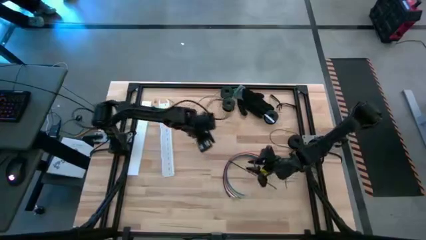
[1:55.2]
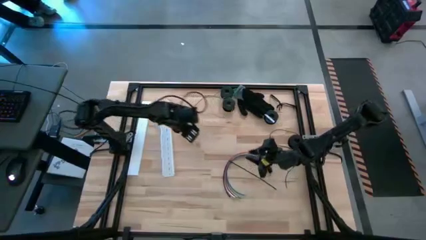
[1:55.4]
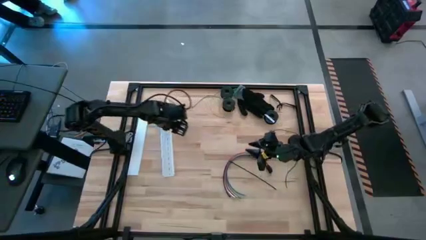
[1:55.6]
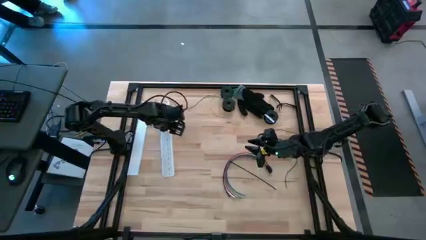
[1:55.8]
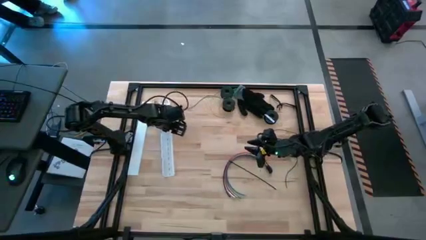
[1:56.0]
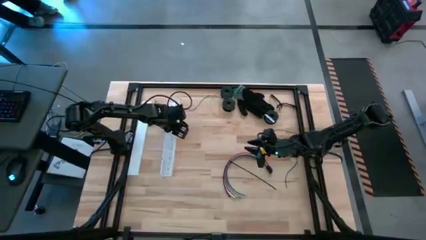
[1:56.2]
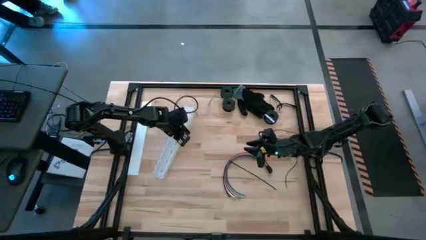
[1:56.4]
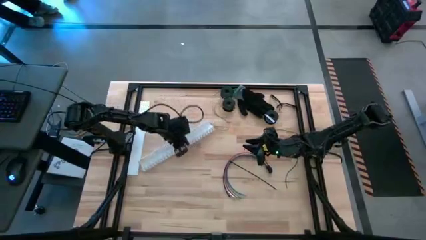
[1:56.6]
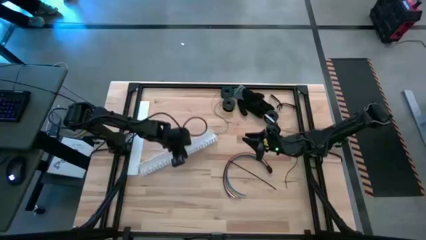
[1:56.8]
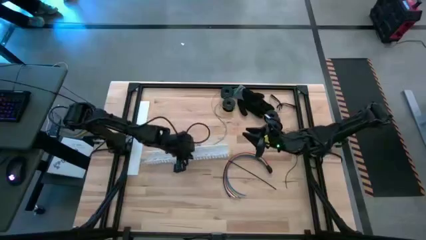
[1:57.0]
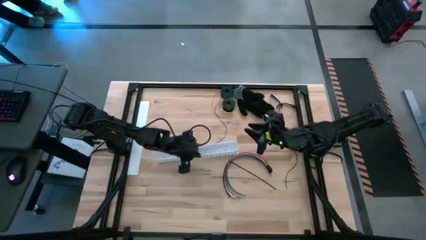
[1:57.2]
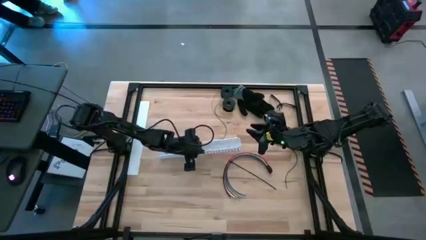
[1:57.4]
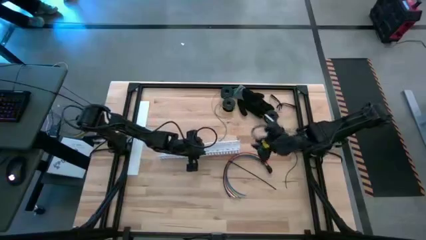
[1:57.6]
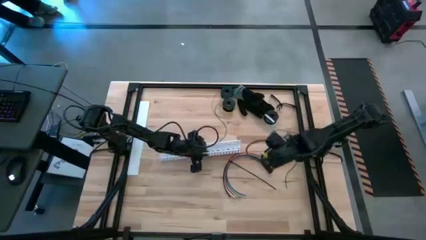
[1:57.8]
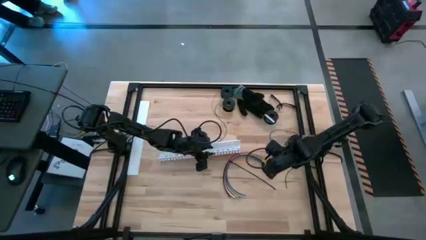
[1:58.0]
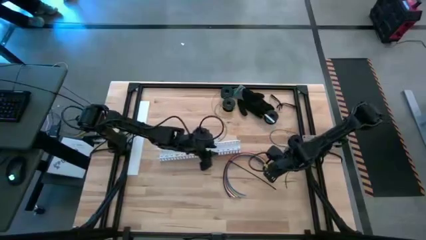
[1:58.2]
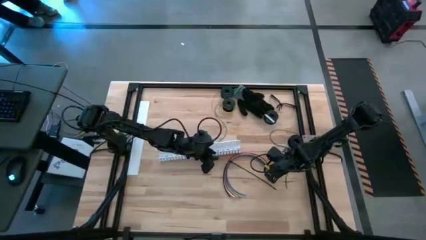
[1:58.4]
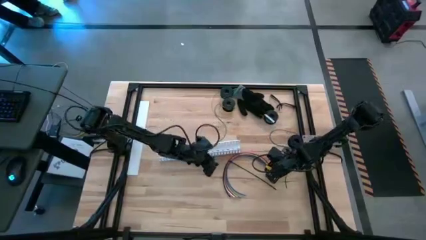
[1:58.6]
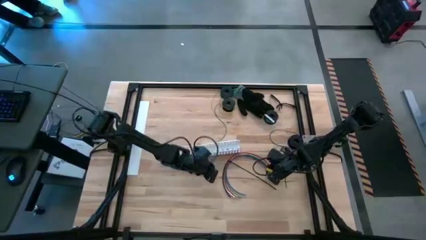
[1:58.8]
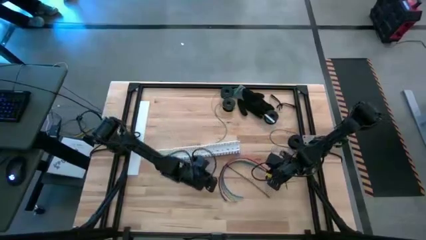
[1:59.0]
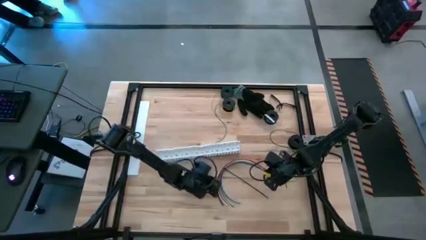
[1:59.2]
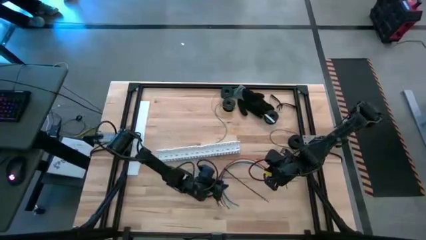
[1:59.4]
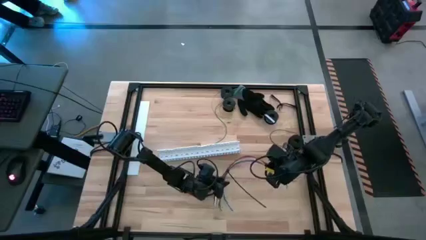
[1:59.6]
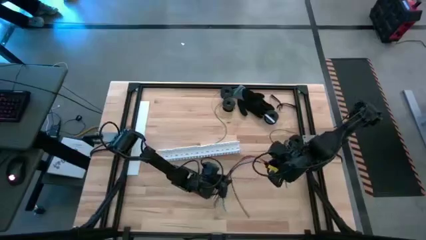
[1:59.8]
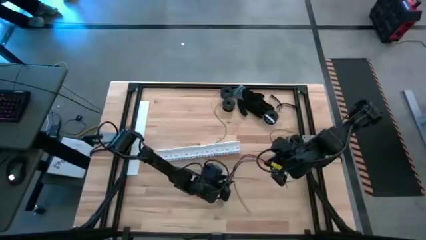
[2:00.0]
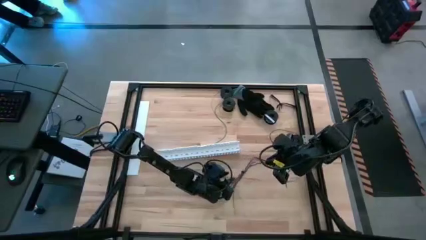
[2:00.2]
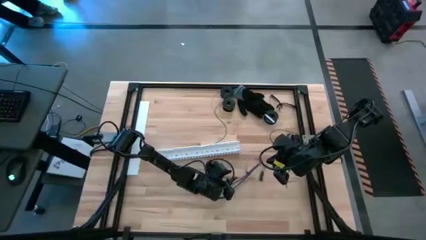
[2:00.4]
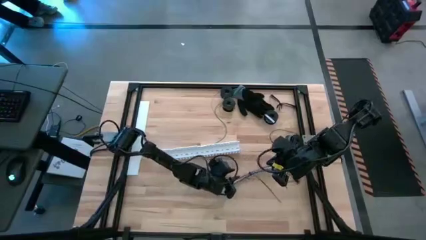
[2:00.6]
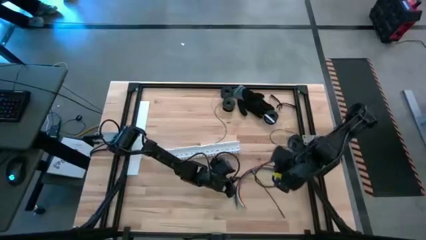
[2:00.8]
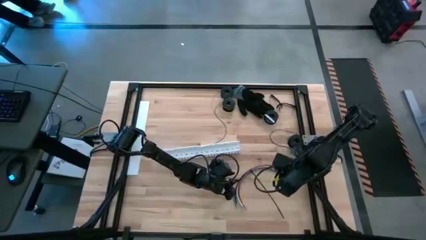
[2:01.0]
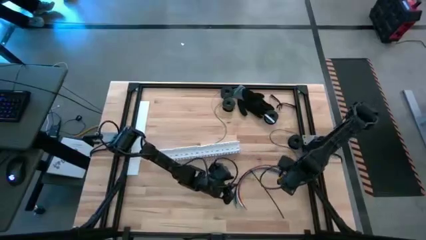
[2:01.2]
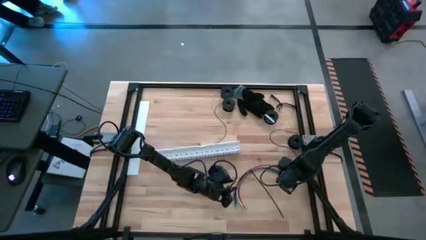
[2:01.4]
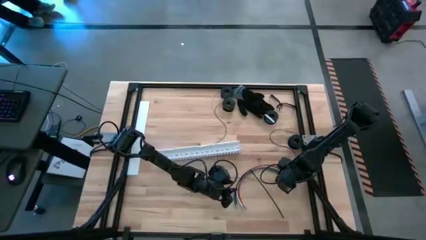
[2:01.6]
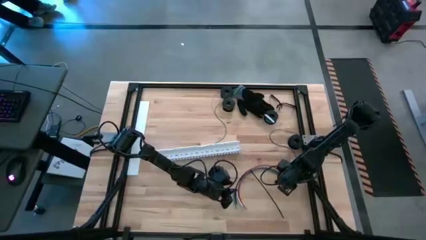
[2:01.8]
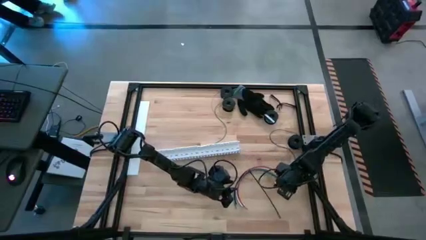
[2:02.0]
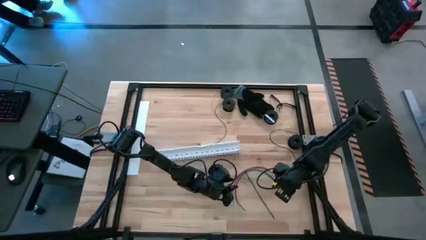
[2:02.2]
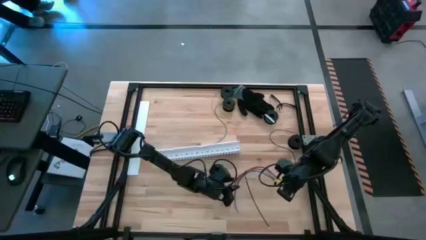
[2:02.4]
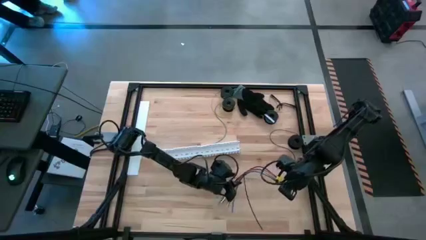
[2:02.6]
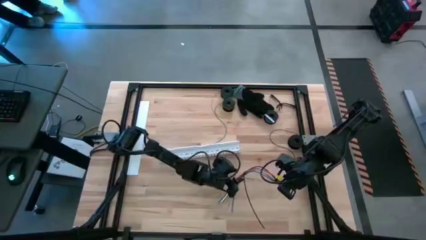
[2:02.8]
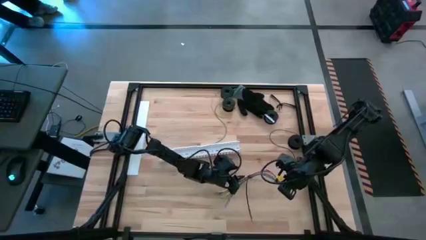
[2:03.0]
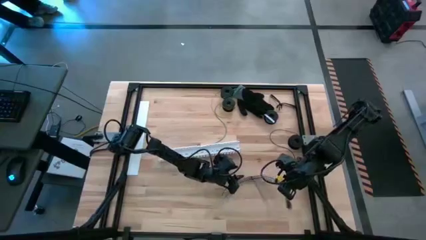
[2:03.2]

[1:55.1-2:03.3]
Task: Ziptie cables
Put ziptied cables in a white cable duct

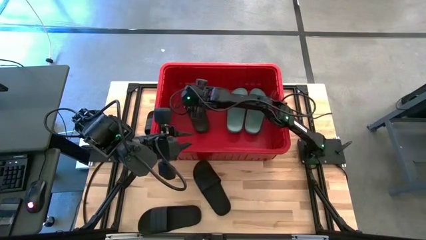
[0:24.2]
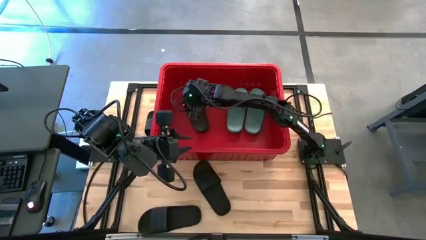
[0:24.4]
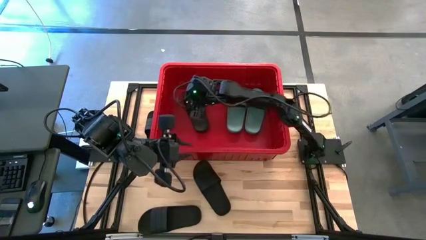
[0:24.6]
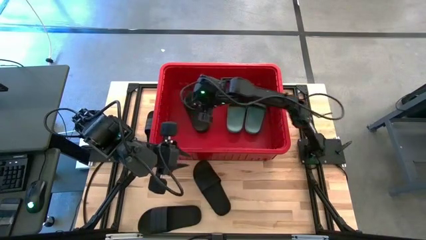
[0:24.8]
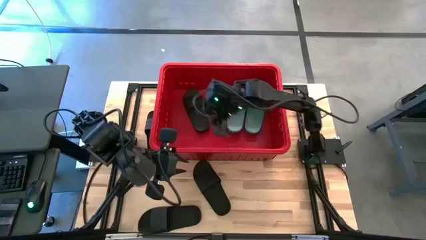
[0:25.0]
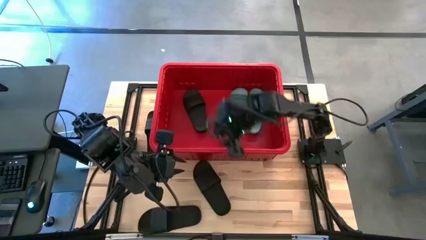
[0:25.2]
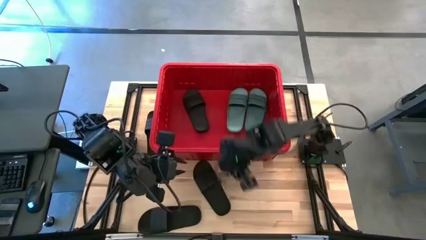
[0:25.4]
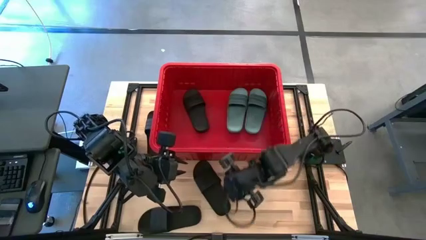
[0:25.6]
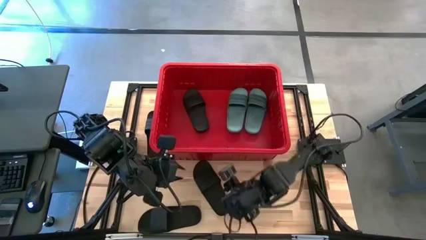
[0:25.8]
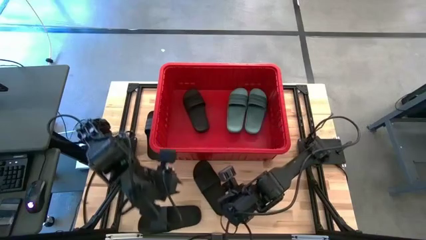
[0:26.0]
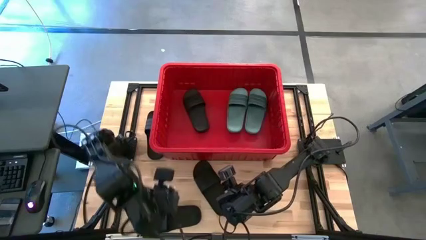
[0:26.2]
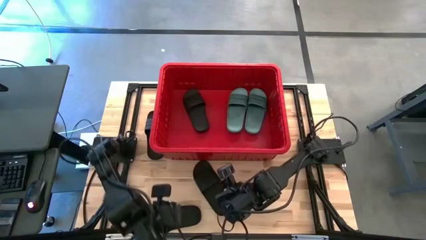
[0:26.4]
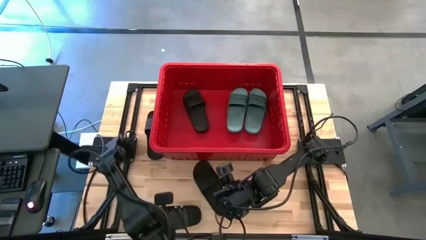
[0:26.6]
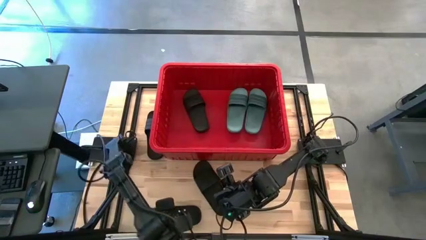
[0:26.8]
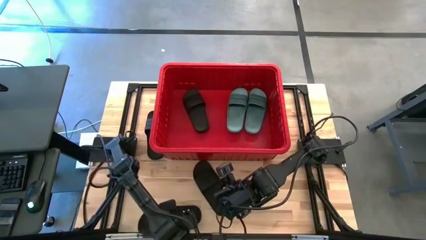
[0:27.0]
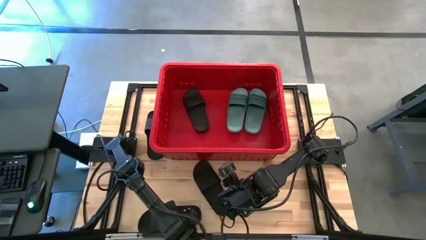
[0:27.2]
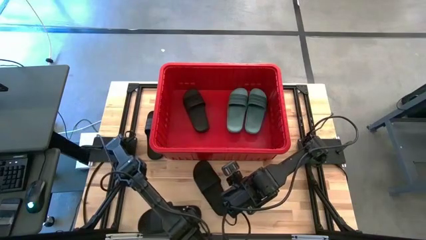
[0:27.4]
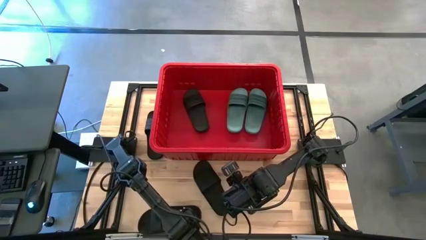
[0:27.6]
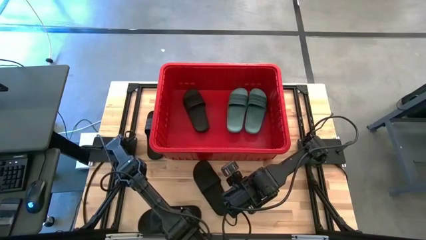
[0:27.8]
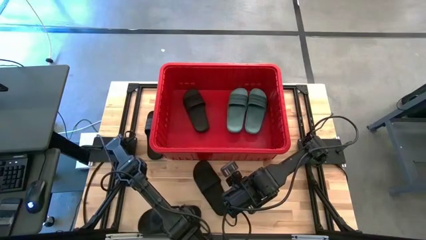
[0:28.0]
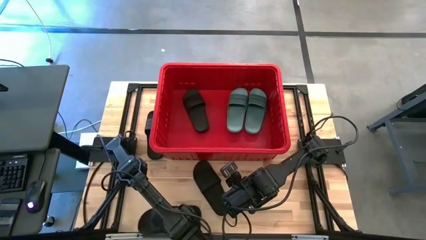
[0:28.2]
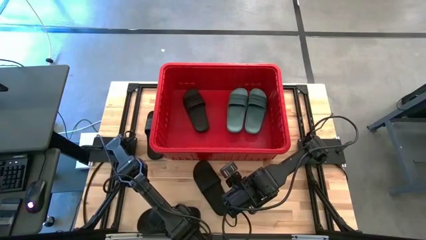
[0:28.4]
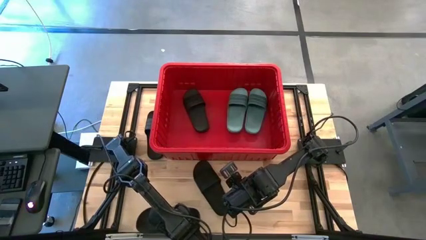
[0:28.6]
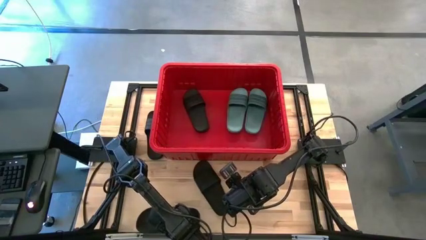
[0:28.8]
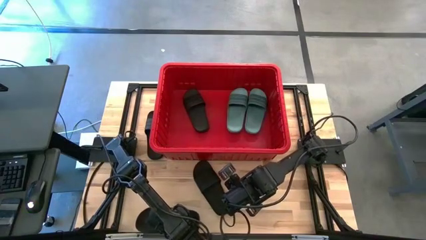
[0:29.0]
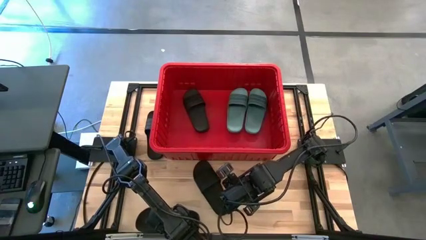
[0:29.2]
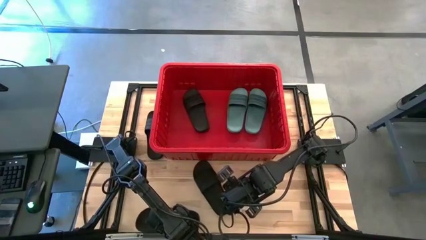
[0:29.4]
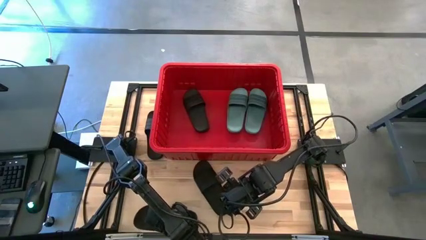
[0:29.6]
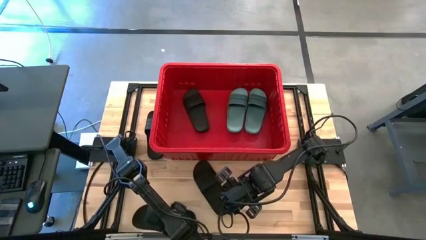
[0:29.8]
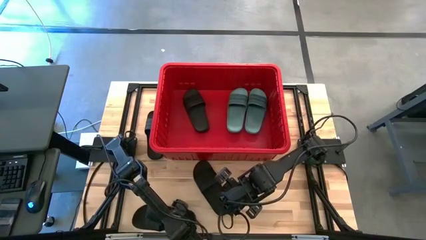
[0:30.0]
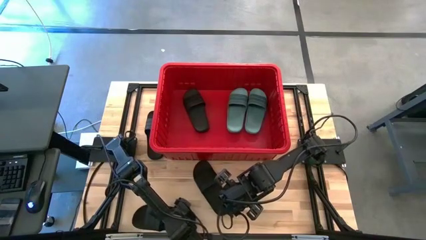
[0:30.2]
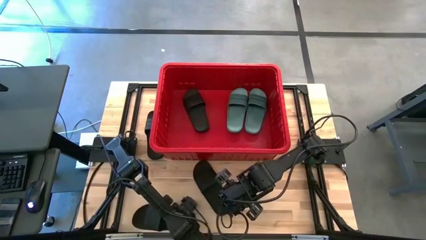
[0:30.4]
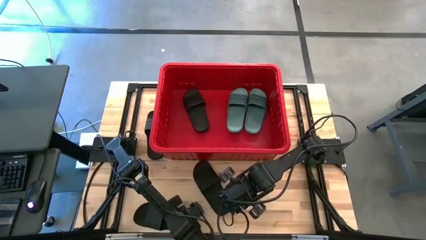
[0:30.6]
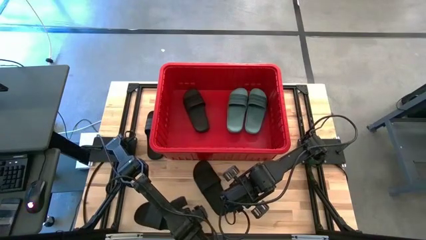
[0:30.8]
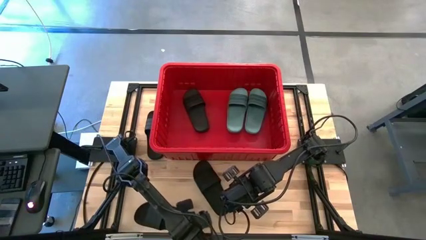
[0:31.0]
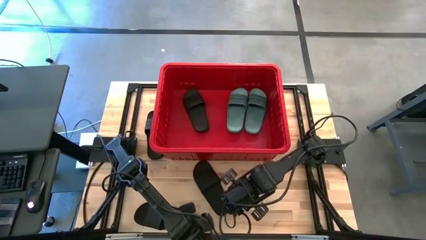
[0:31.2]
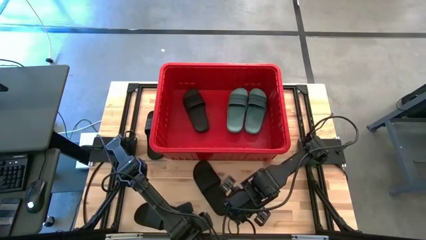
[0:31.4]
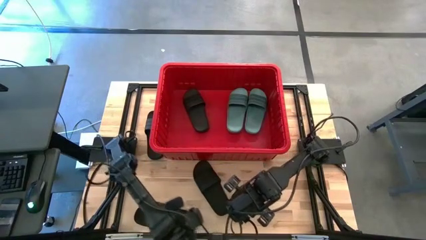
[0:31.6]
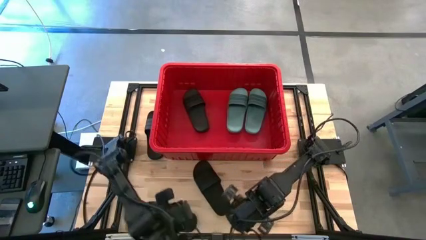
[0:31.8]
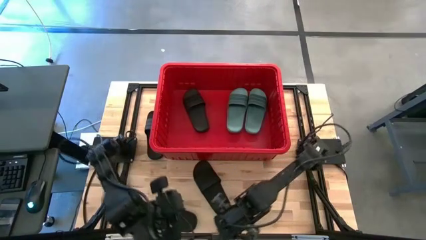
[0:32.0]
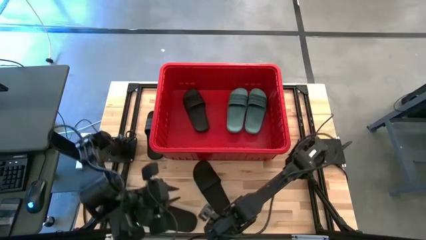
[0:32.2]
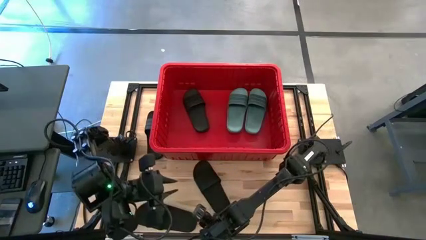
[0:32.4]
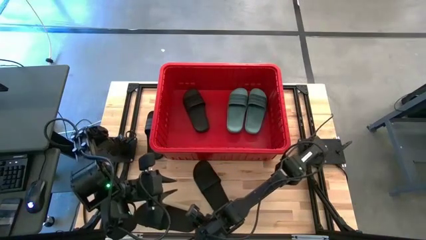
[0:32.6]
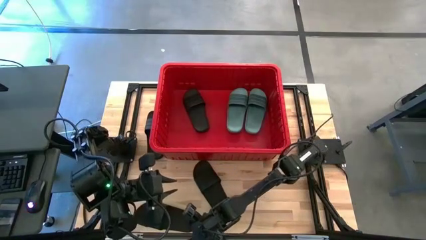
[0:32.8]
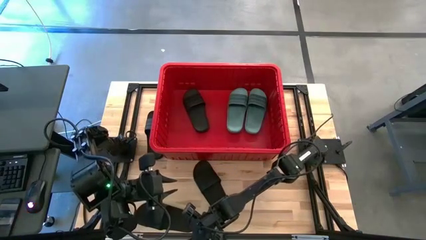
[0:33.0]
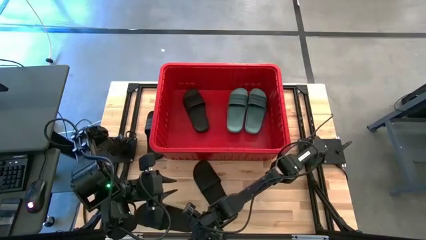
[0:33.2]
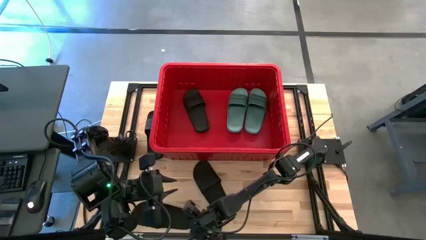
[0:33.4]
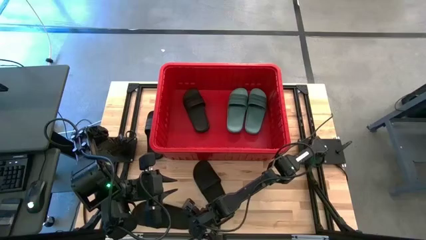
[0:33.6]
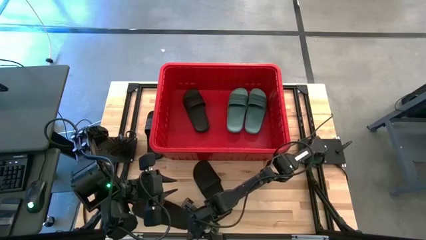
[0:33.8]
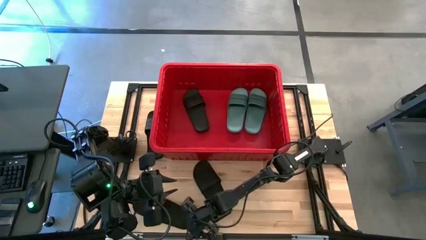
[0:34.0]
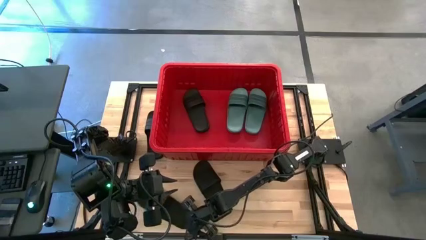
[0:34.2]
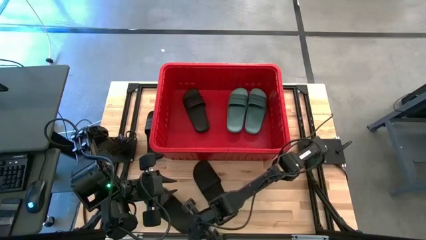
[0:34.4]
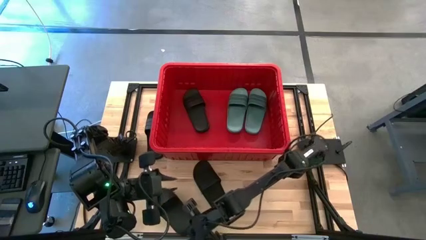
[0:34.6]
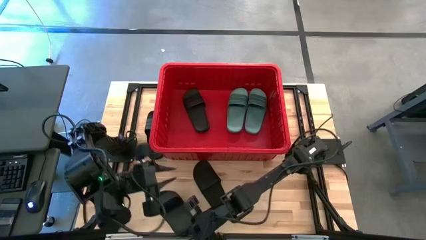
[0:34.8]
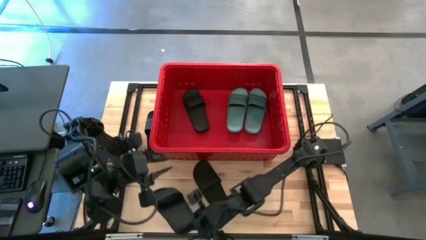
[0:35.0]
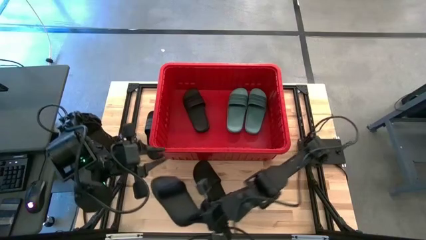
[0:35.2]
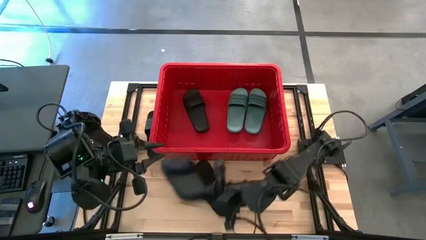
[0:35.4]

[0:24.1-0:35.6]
Task: Pick and place slides into bin
Put the bottom black slipper into the red bin
